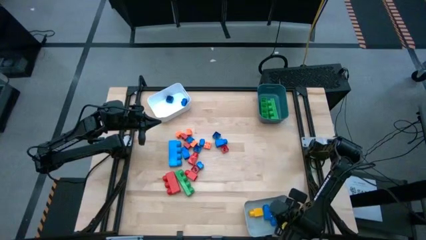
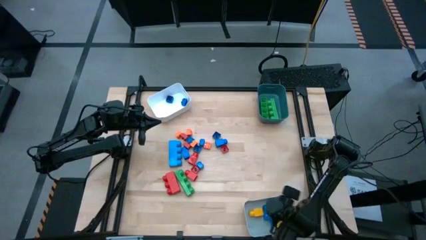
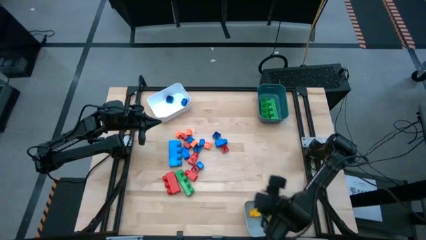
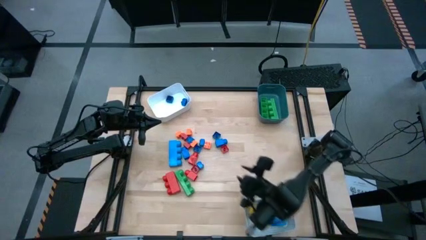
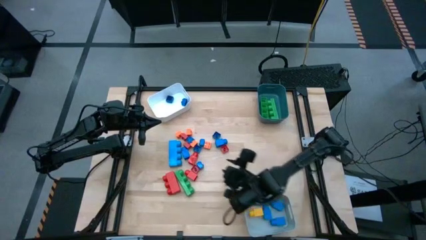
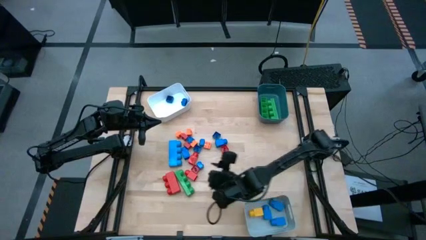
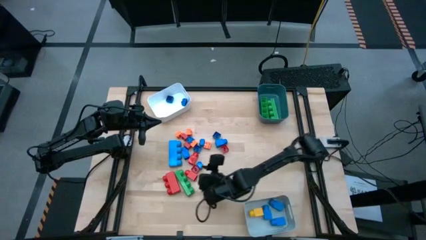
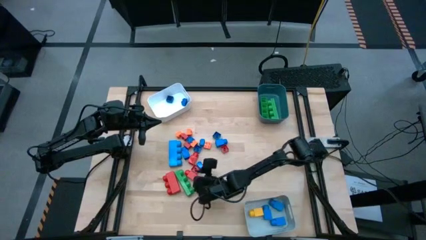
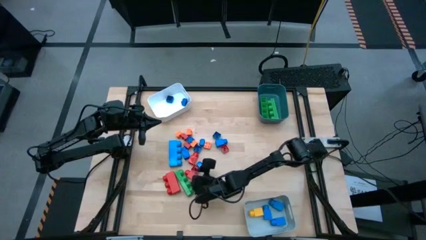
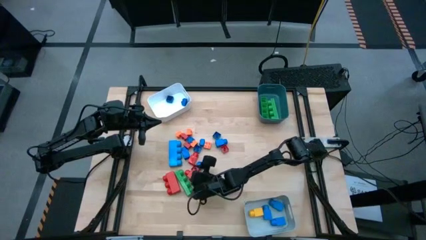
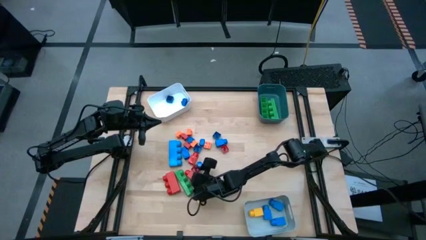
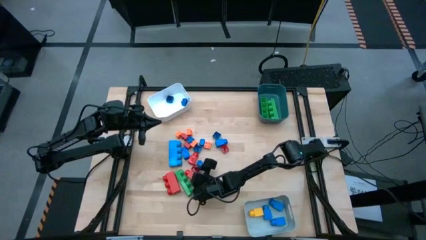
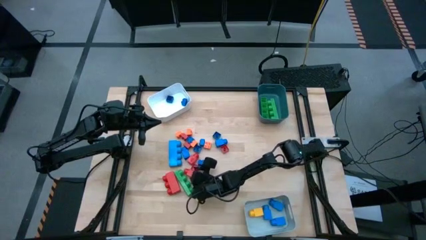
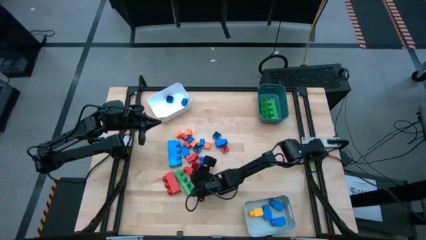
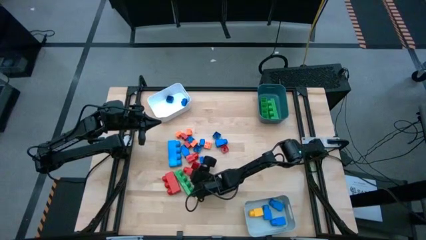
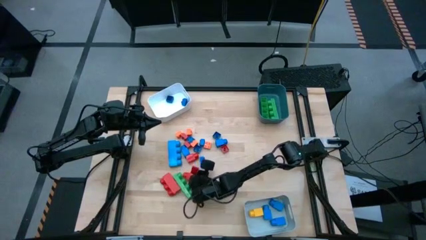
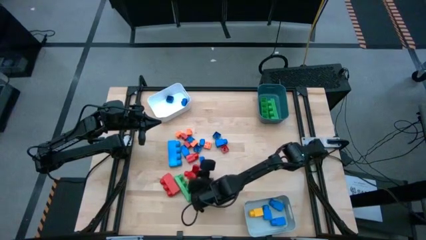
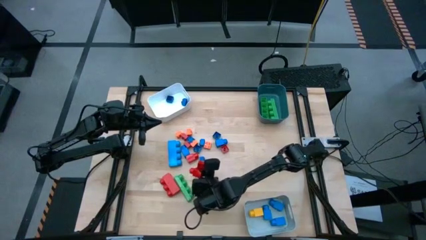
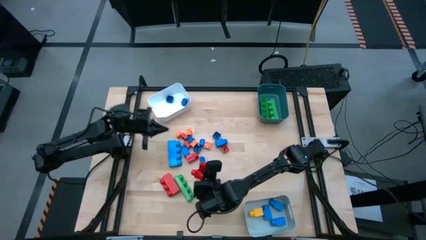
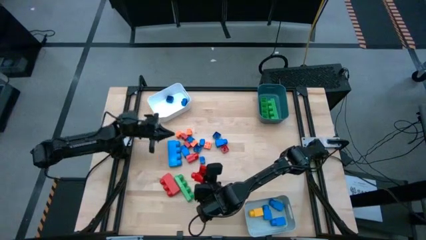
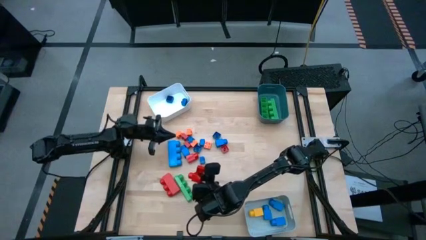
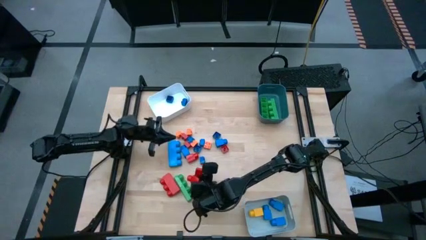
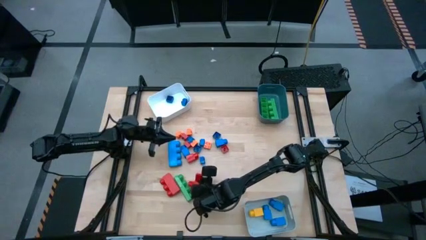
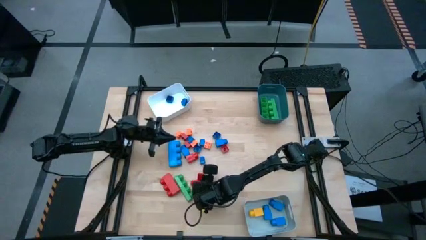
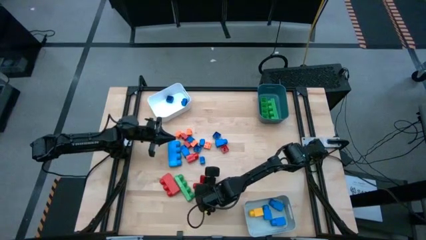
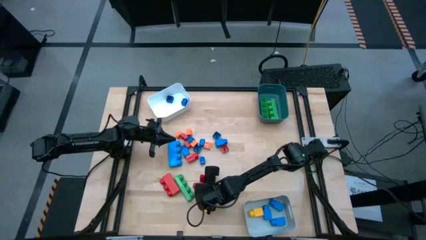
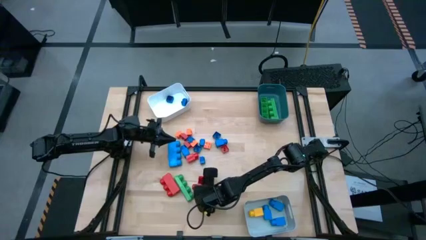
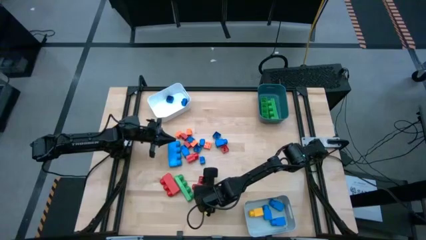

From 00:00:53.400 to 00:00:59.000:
Task: Sort blocks by size
Put the 1 stud red game piece into the gray bin

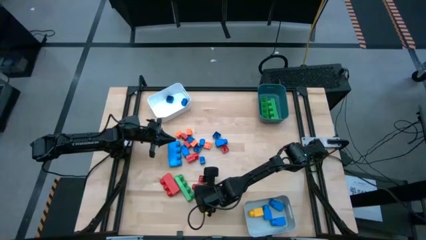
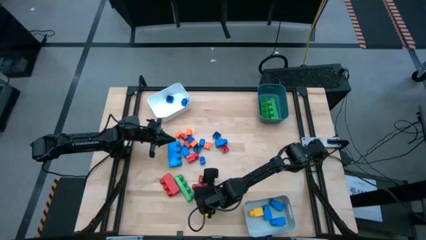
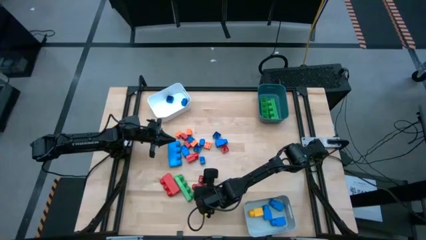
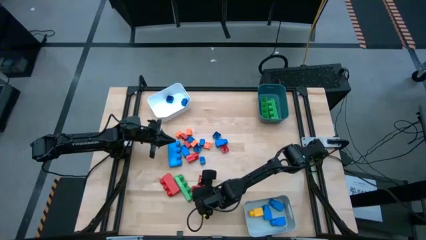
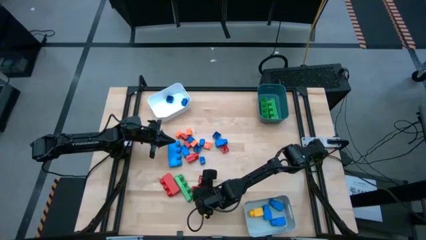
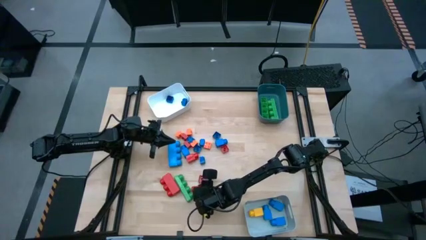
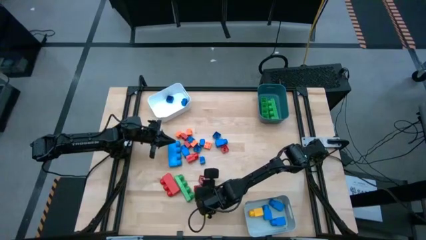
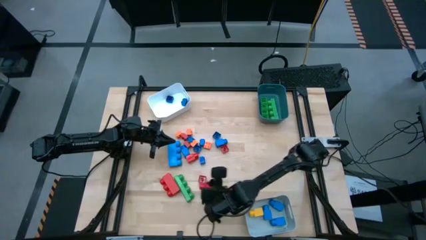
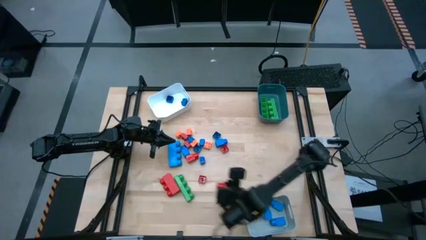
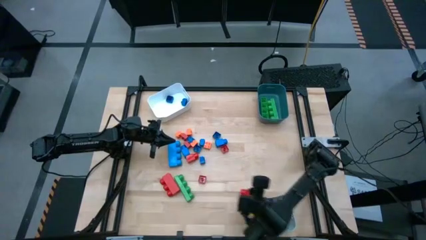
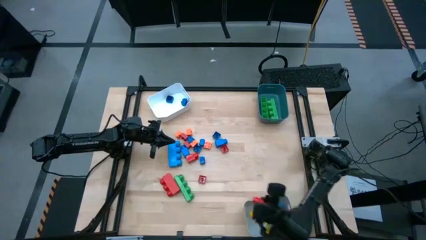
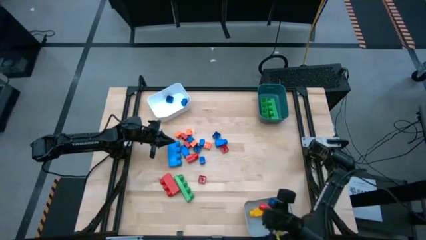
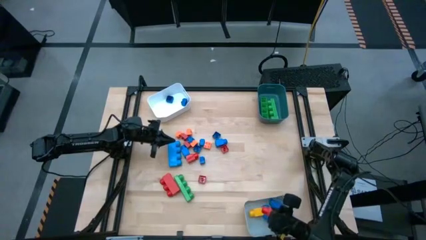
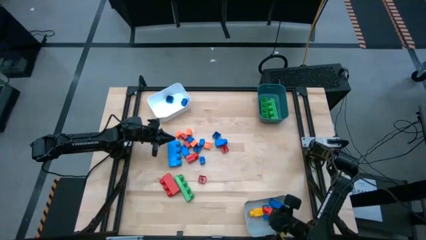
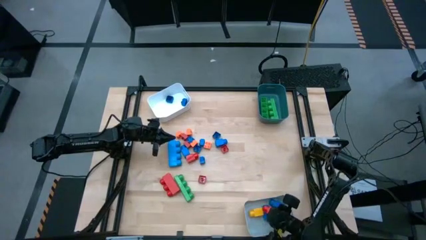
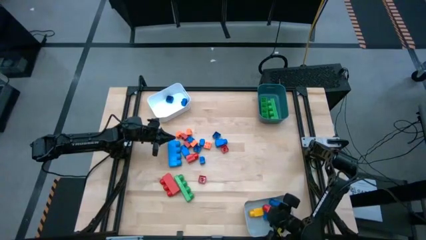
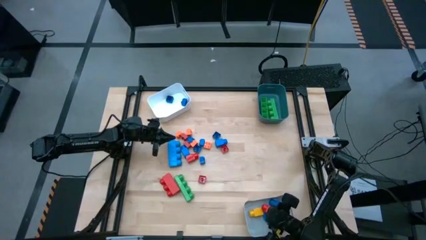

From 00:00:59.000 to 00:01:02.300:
Put the 1 stud red game piece into the gray bin

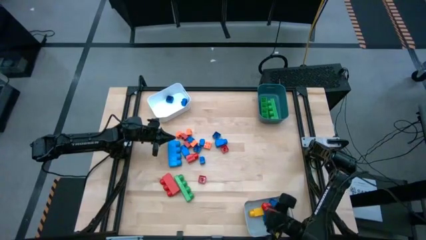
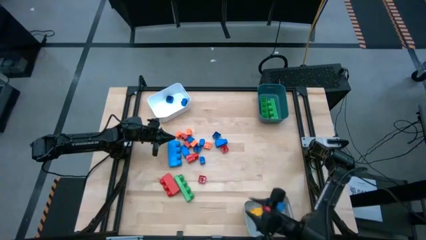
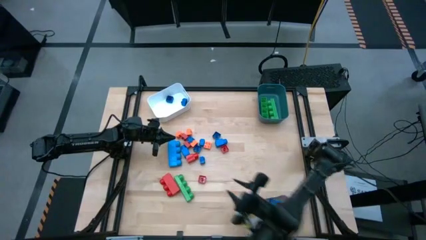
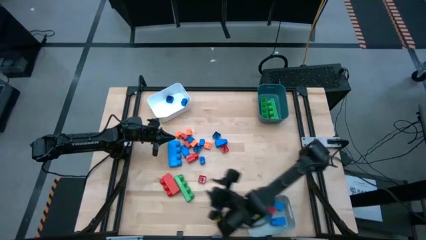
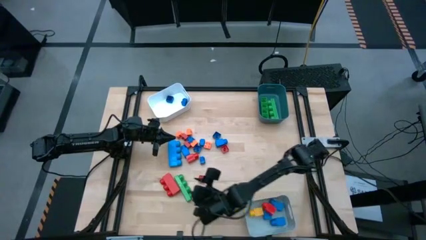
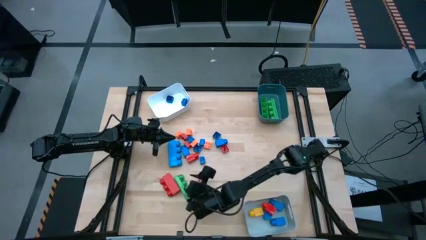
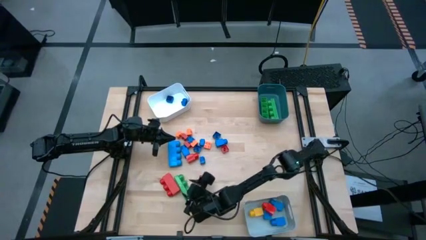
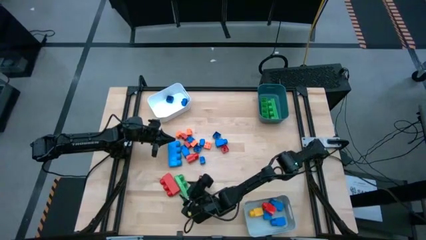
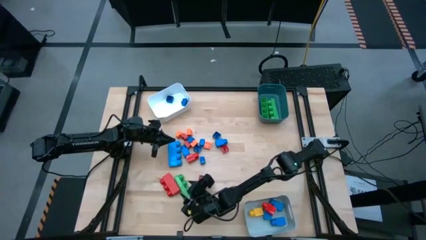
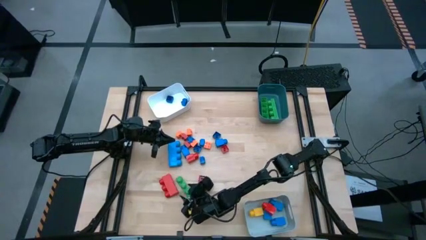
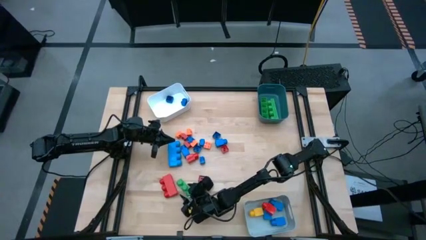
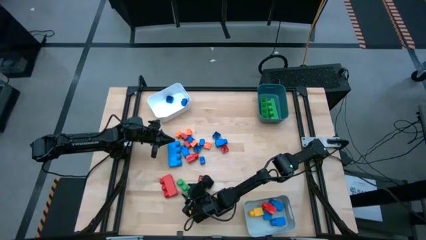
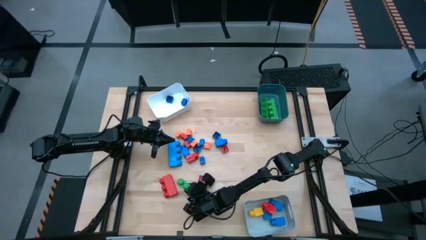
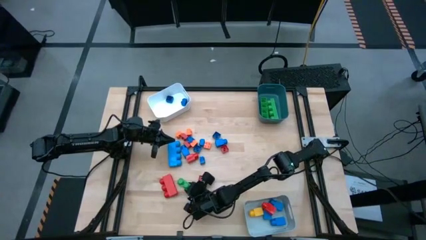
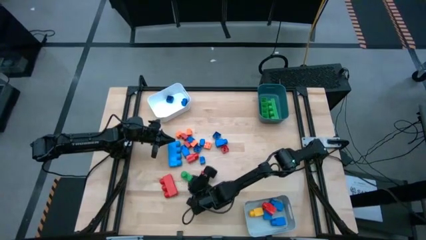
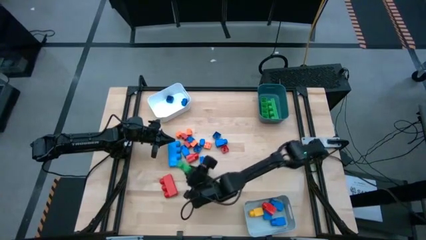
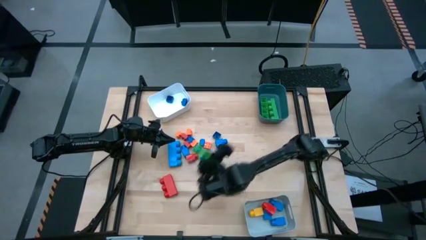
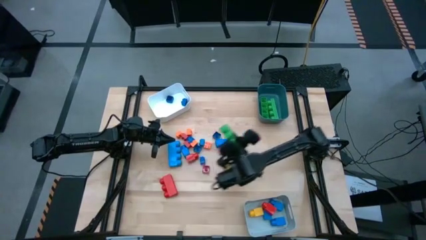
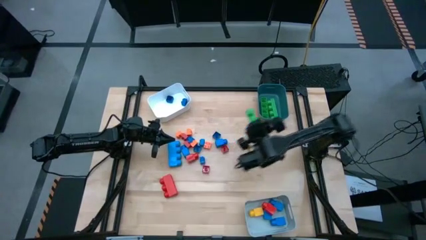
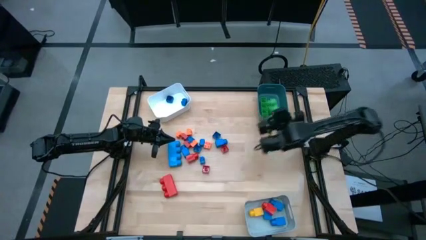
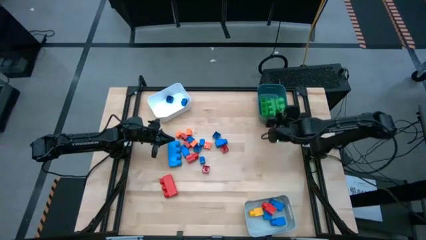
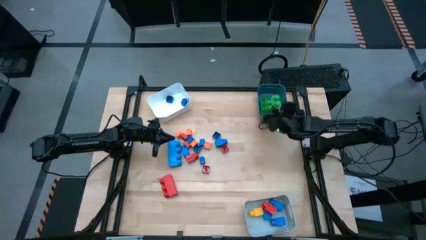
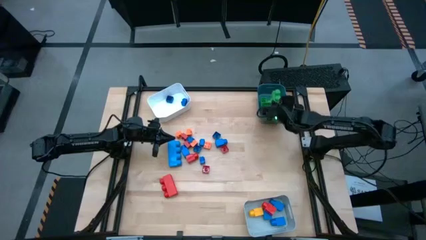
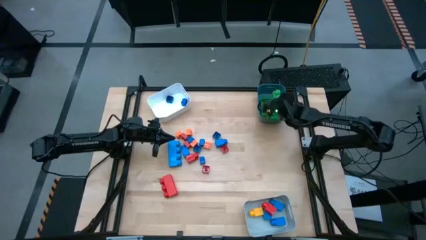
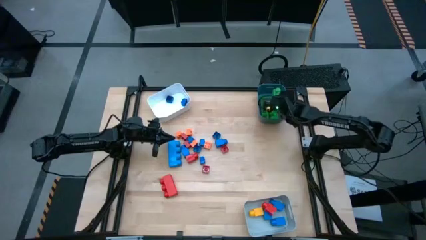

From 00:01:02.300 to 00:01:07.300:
Put the large 4 stud green game piece into the blue bin

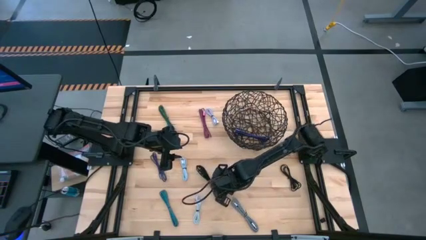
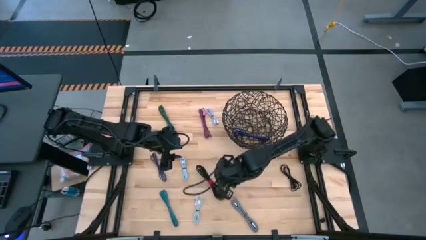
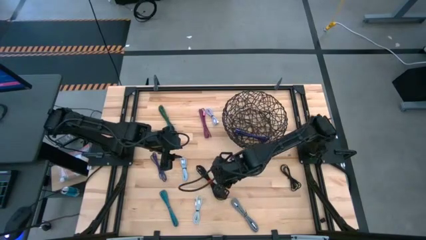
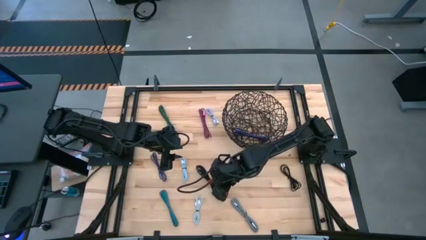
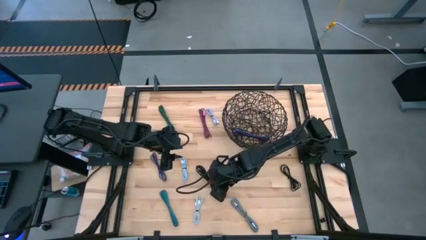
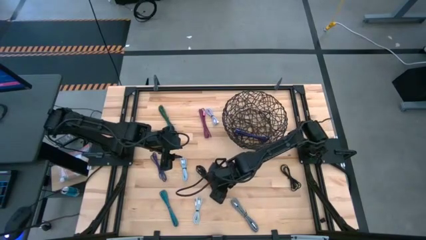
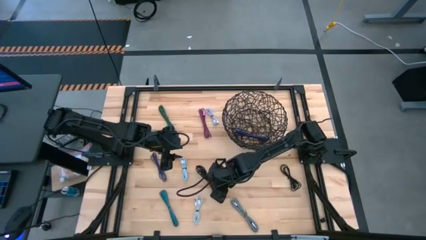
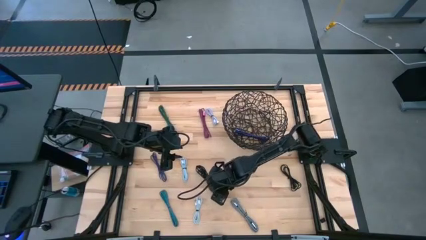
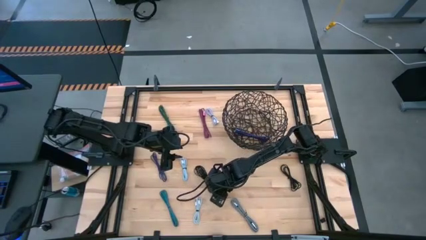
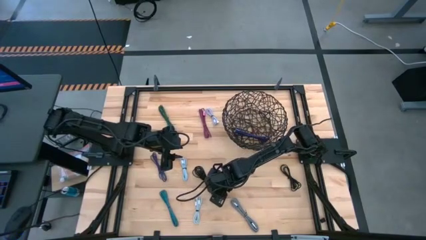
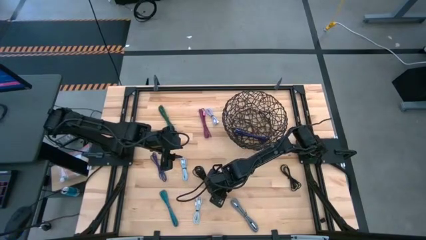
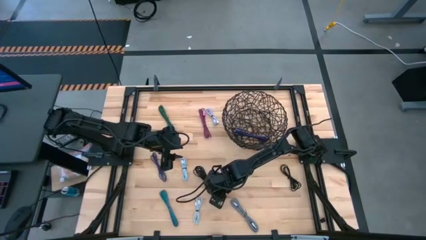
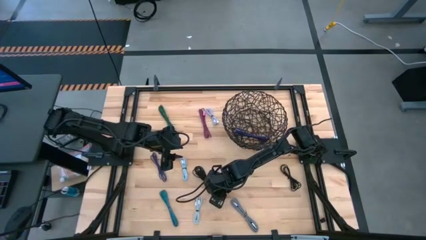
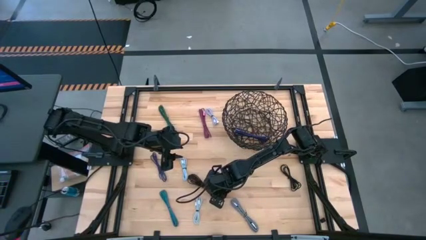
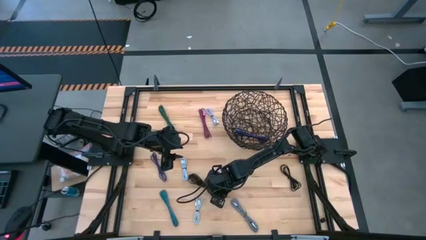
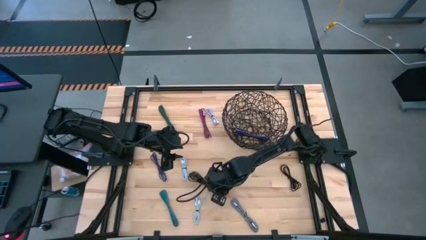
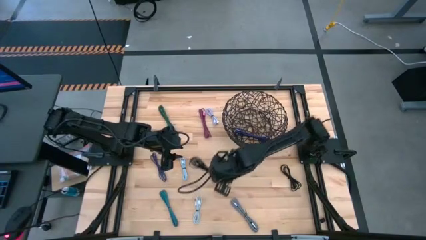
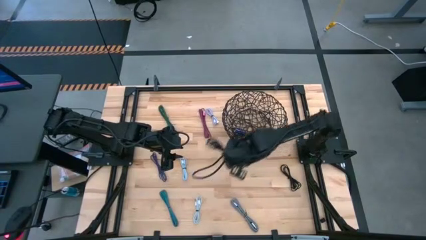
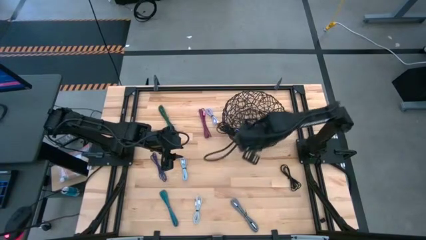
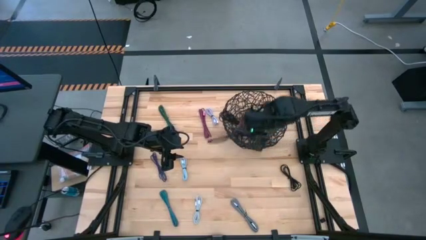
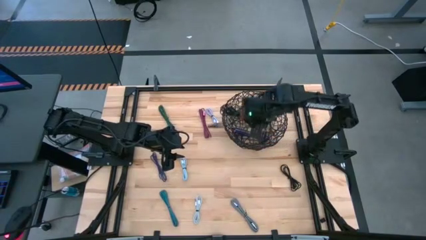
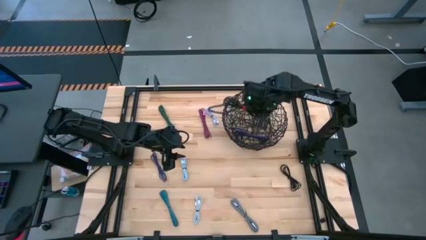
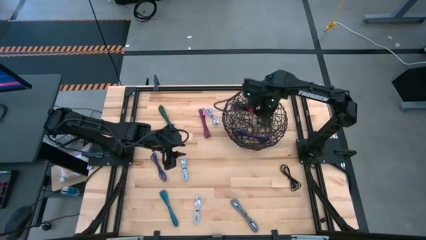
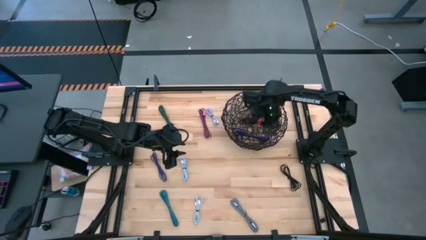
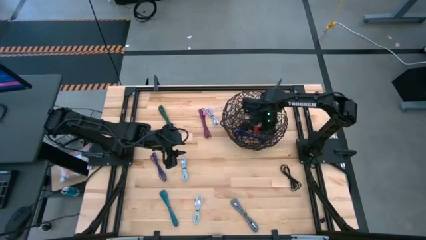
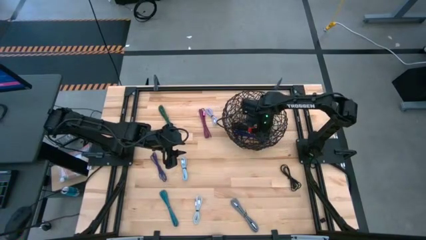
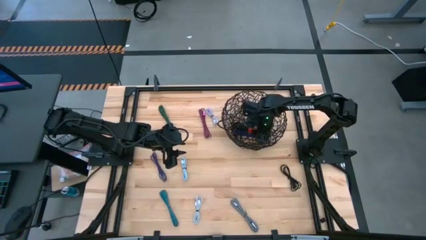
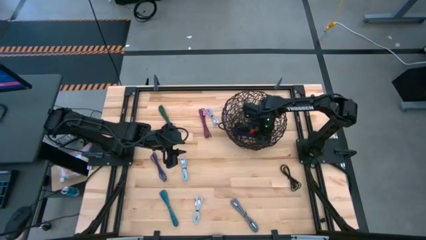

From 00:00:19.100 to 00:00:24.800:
Task: Pick and place USB-C Cables
Put the left black charger cable into the black wire basket
